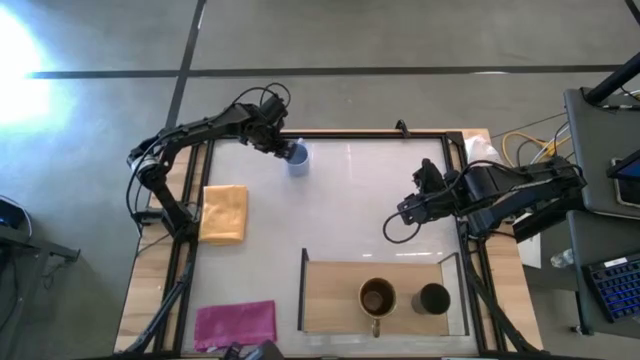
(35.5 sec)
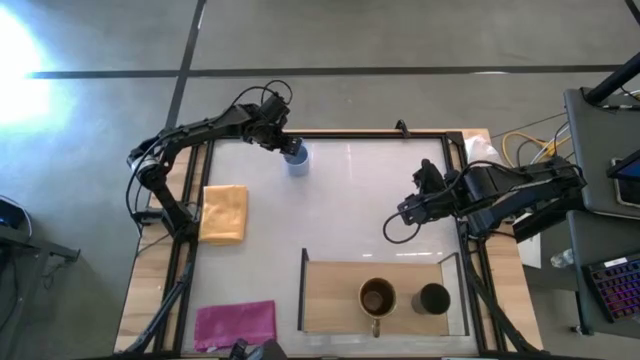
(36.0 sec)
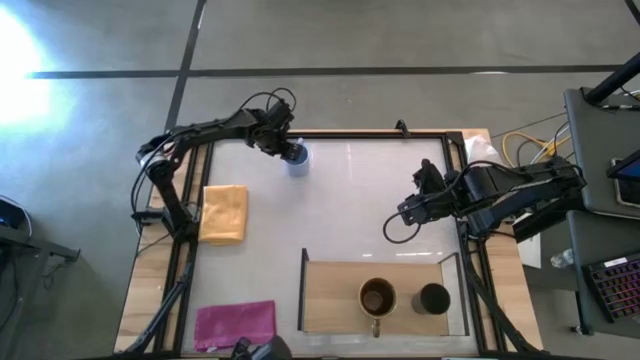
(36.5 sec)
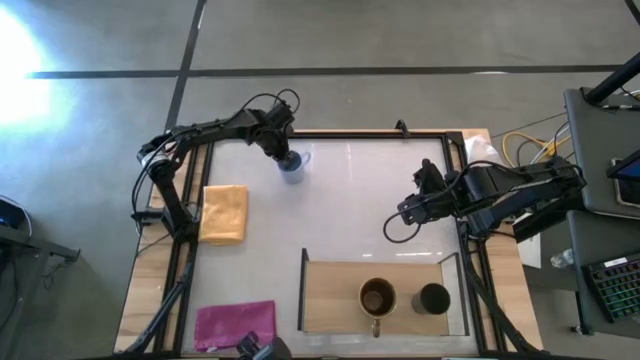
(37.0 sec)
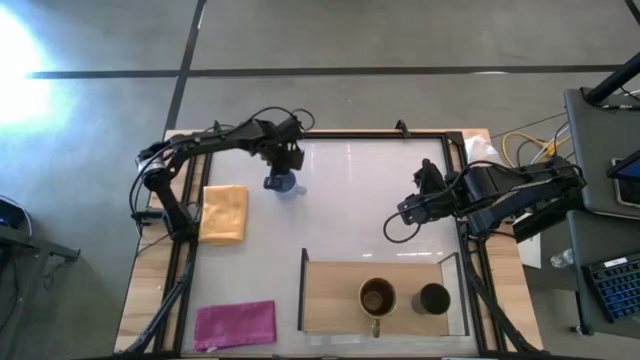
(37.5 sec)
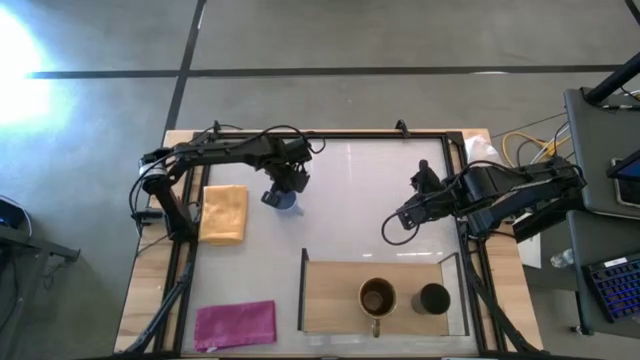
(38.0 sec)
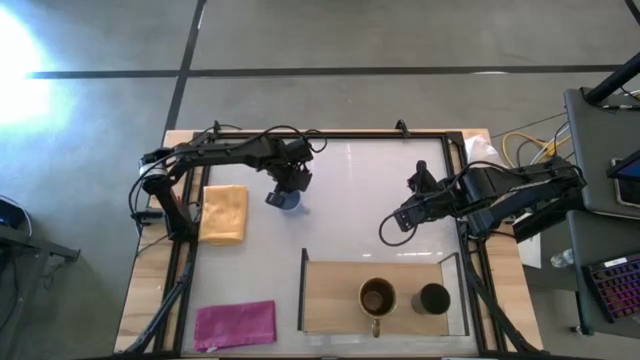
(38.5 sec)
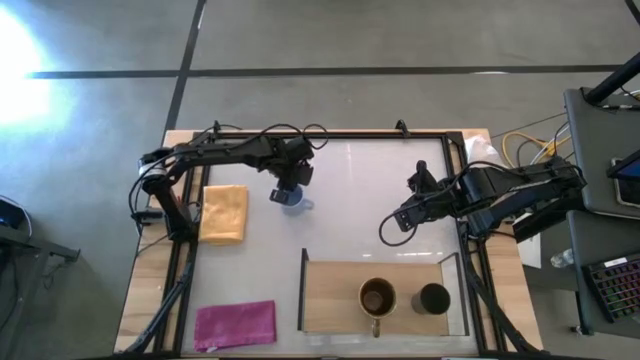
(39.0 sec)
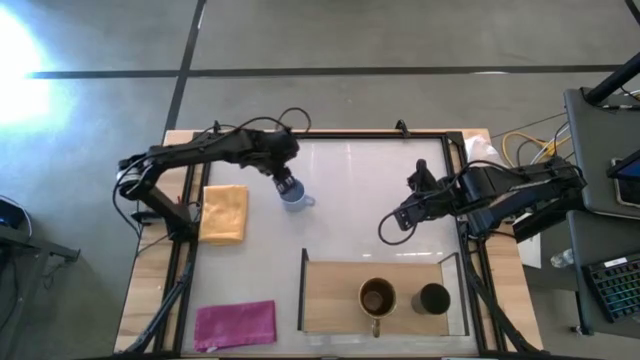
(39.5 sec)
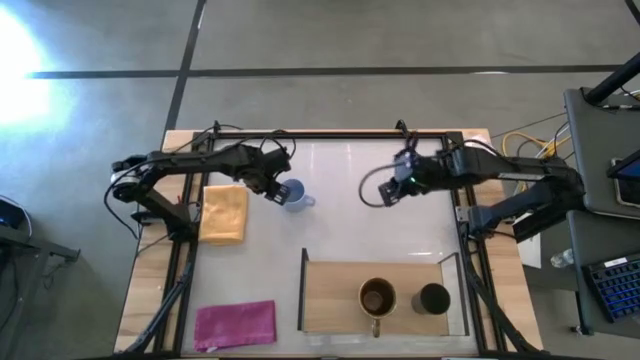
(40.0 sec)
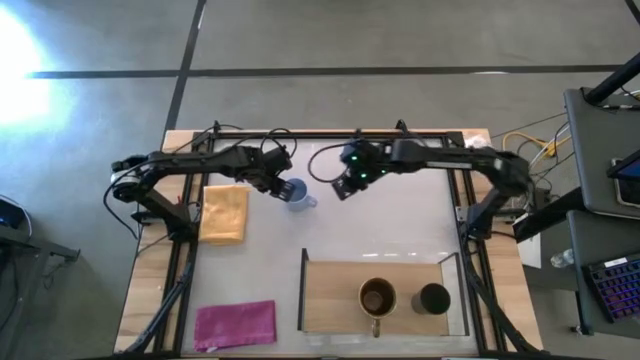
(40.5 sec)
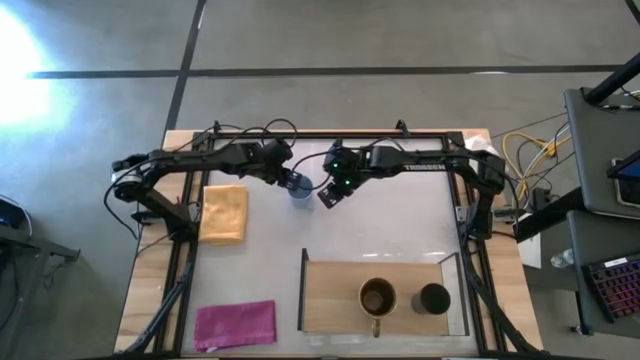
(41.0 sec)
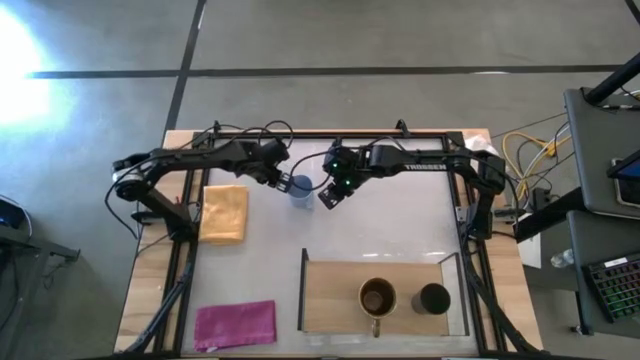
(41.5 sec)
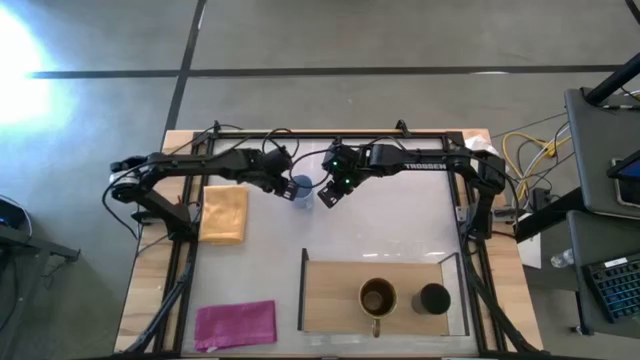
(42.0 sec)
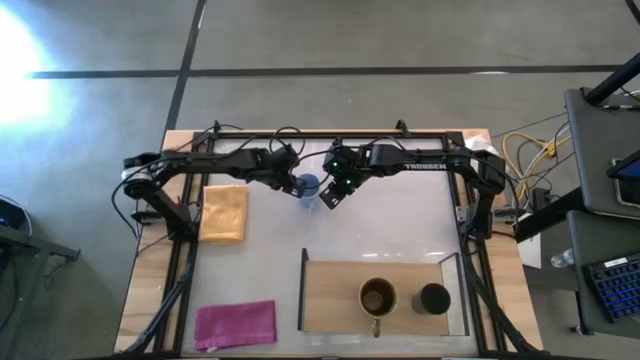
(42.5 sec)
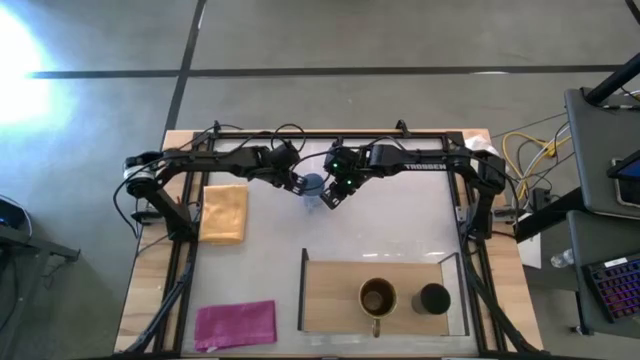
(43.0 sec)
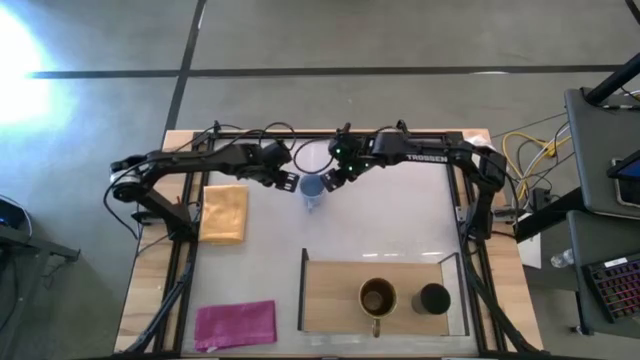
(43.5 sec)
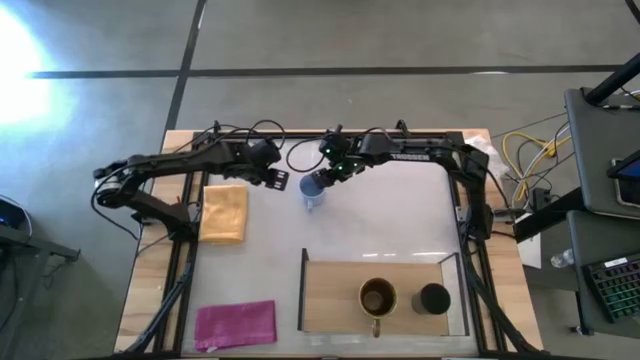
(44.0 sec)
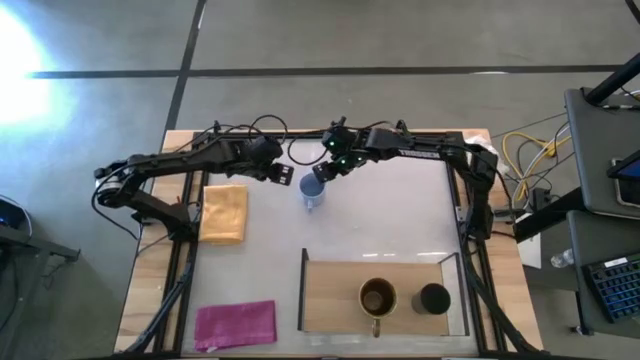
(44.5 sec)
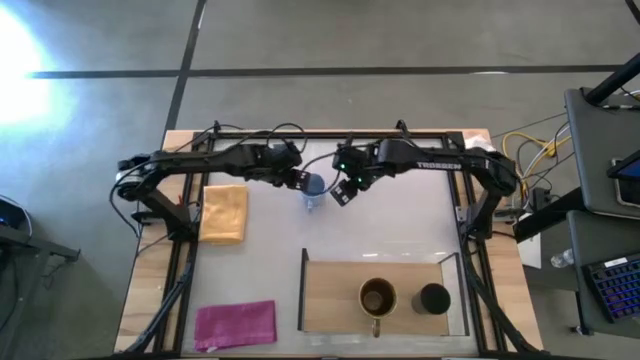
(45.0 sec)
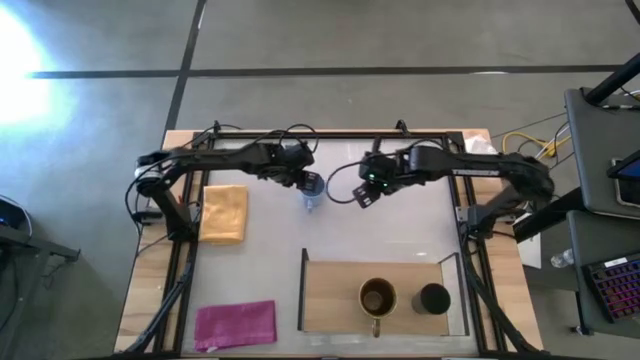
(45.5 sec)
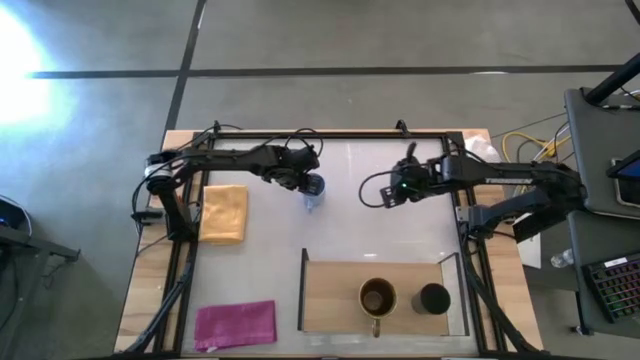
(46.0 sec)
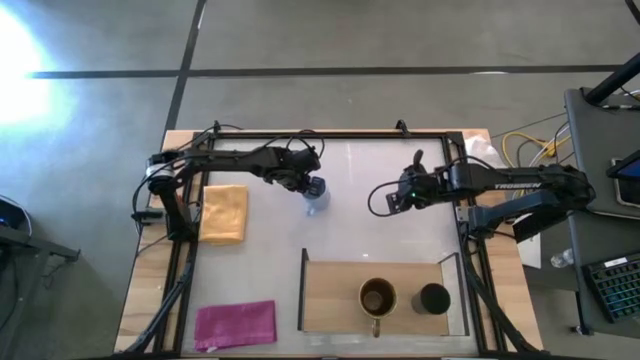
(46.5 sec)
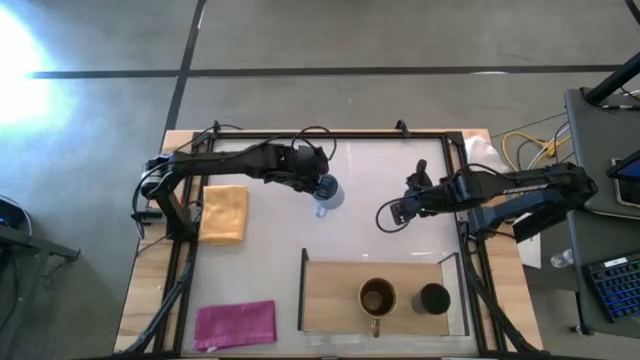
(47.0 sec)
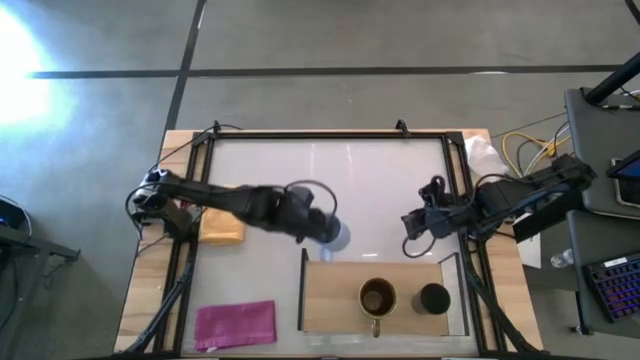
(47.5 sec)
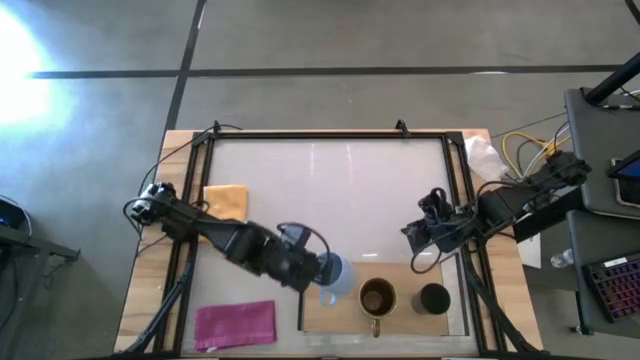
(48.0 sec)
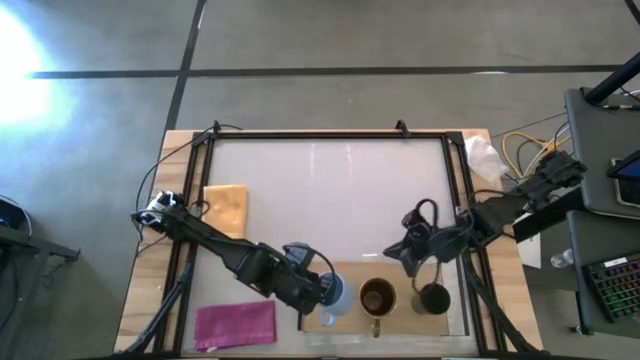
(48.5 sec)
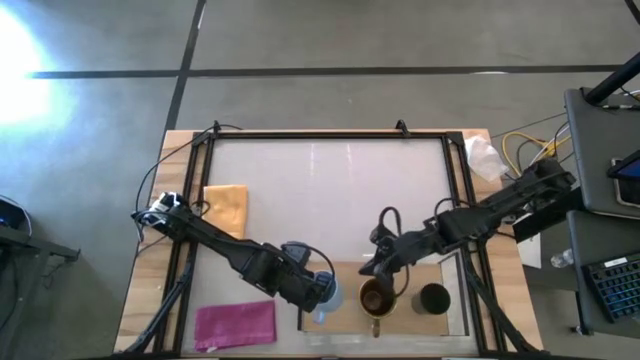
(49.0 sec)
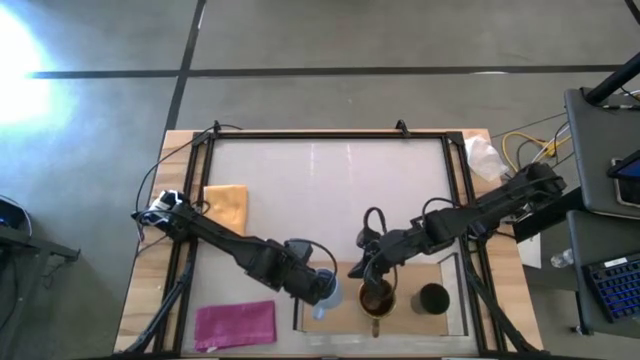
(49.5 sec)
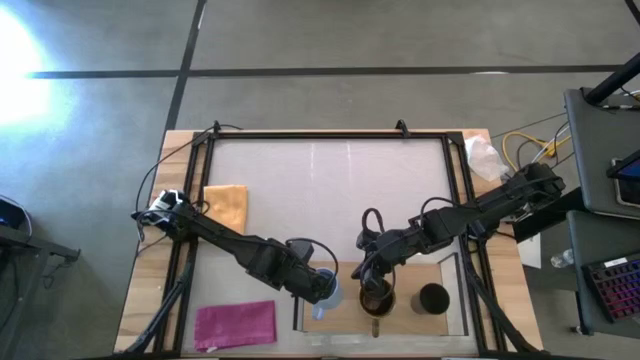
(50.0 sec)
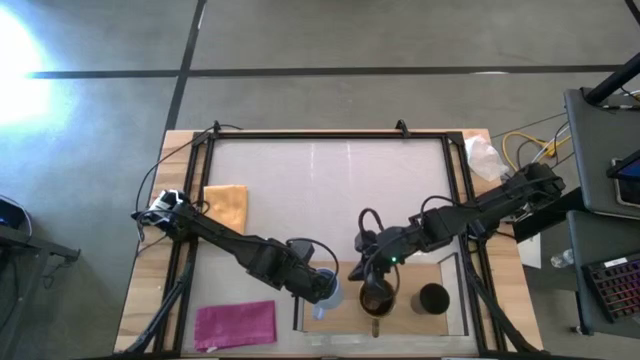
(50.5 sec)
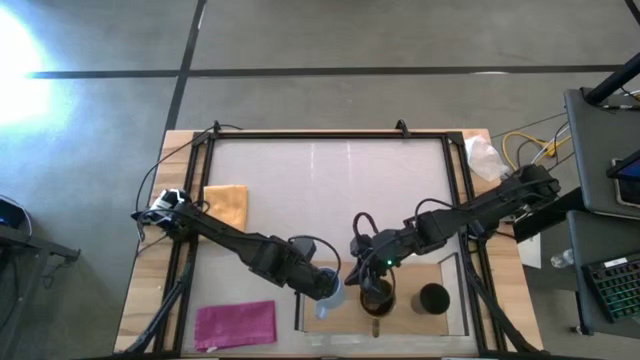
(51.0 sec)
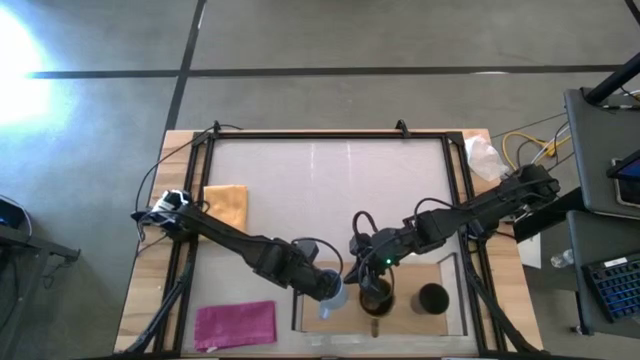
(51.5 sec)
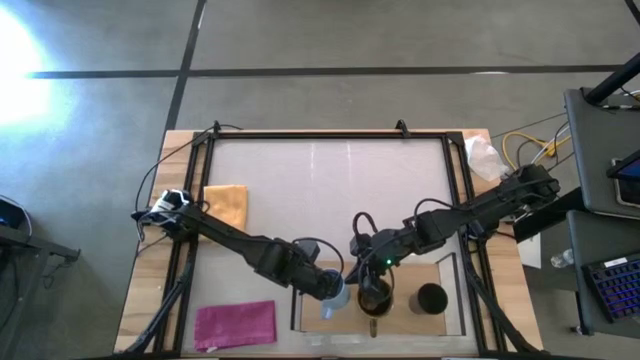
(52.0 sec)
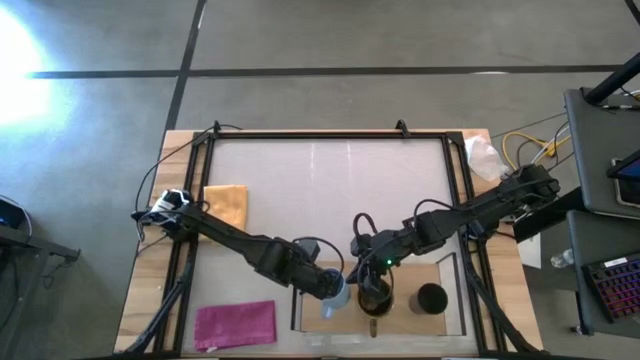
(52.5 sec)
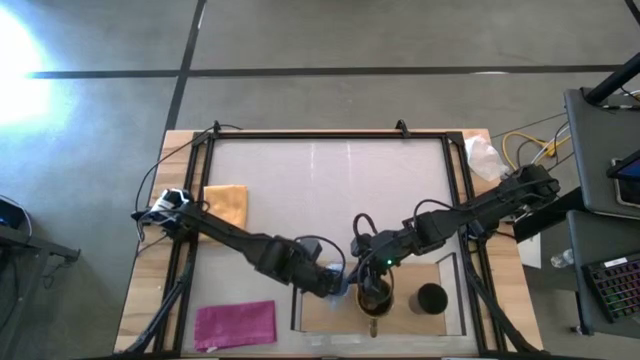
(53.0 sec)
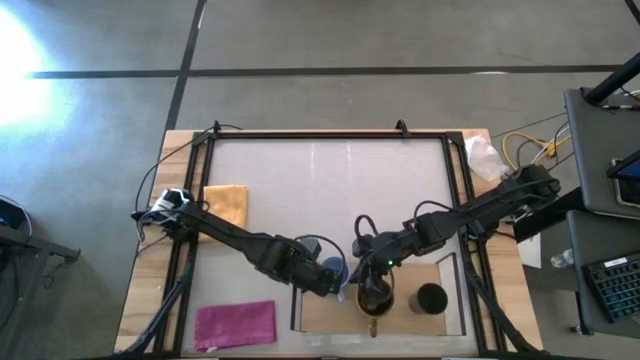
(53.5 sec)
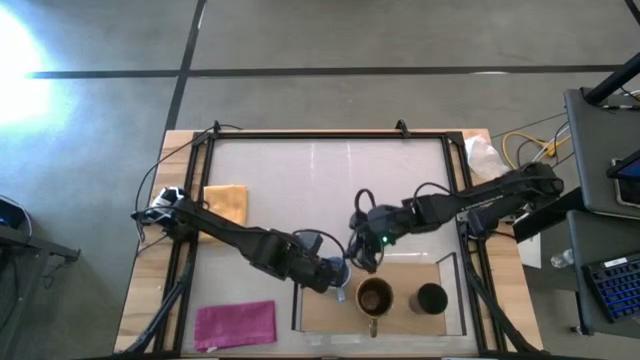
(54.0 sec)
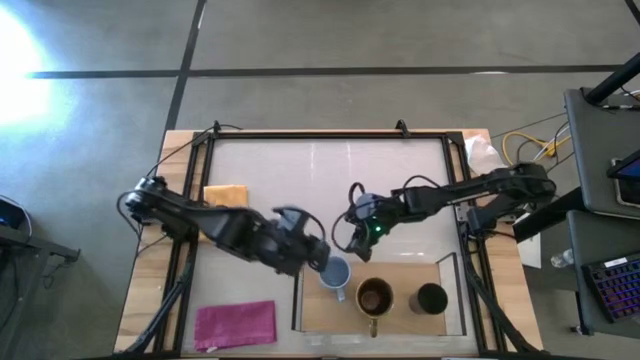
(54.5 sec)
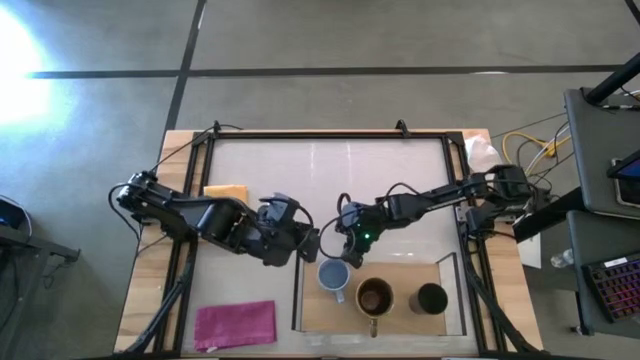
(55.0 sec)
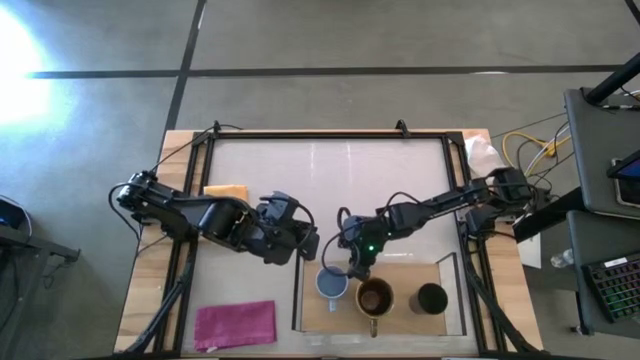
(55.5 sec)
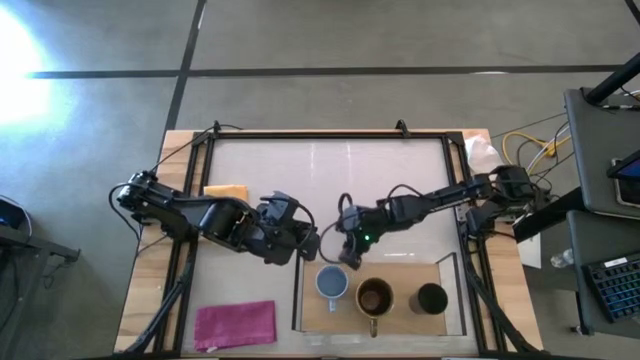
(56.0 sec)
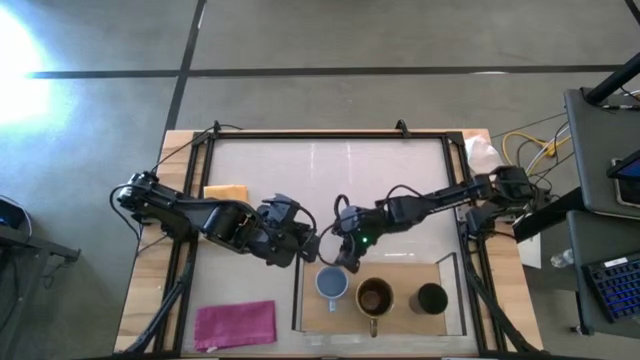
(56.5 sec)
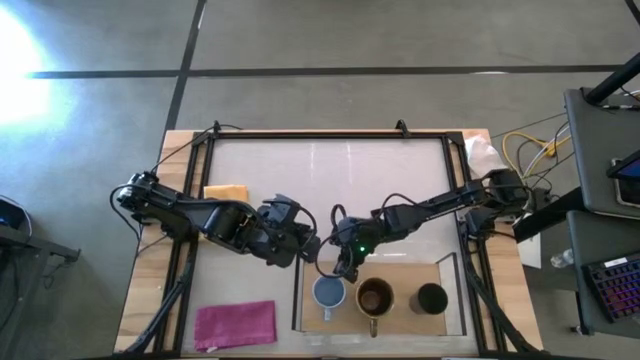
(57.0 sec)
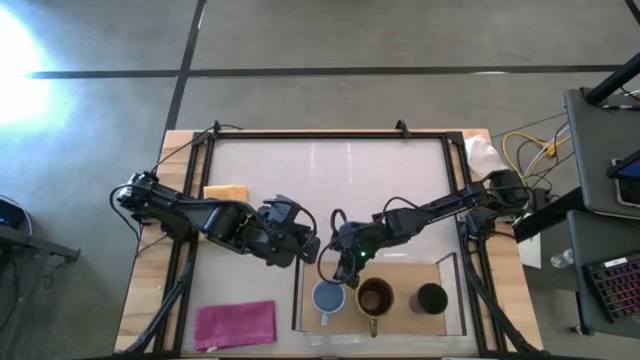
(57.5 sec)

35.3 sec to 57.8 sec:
Task: Stack small to large cups/mugs on shelf
Put the blue mug on the shelf
